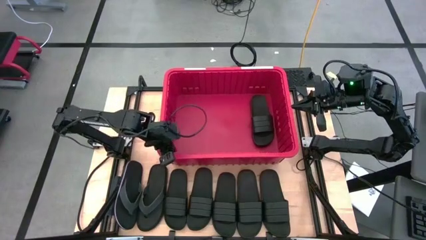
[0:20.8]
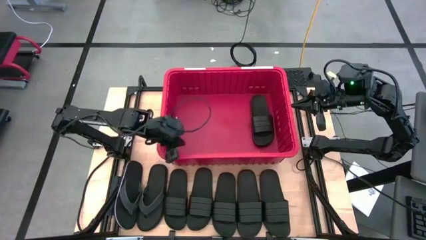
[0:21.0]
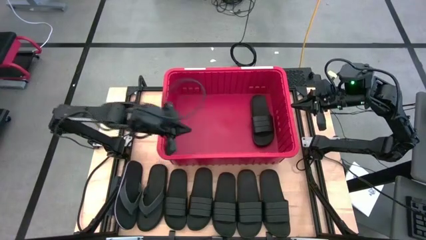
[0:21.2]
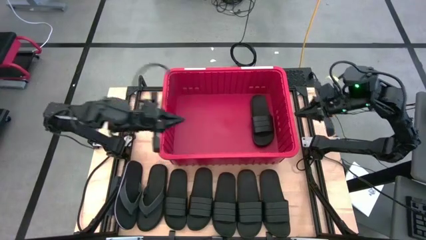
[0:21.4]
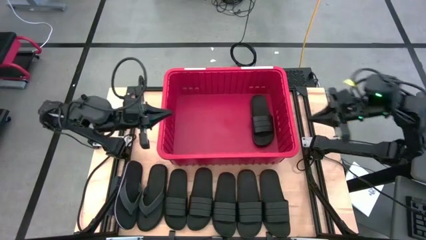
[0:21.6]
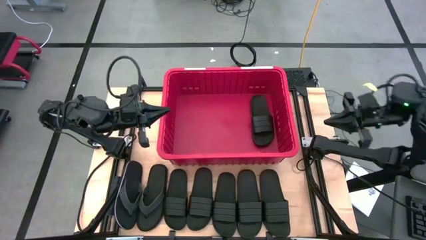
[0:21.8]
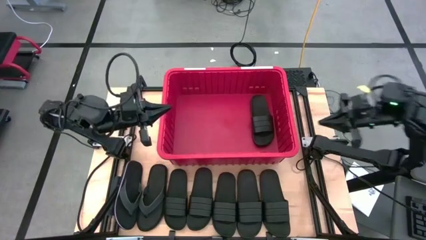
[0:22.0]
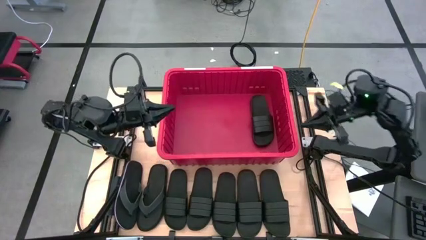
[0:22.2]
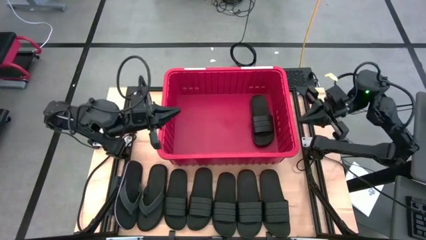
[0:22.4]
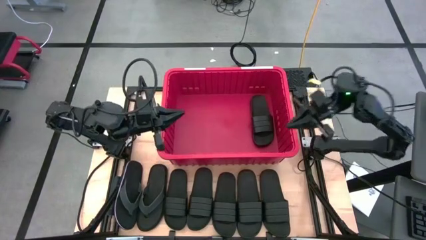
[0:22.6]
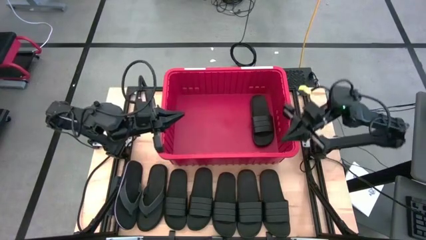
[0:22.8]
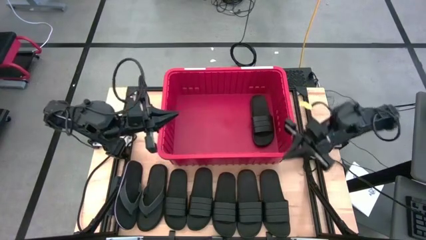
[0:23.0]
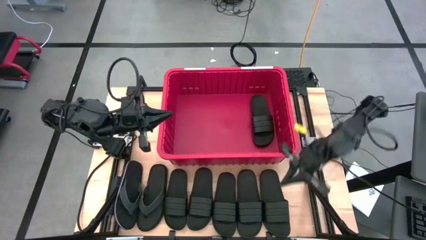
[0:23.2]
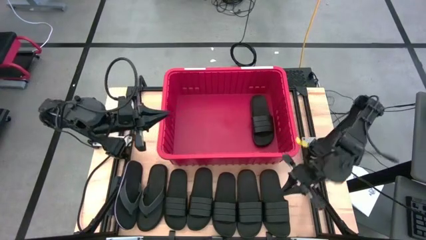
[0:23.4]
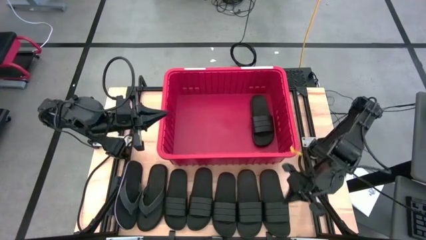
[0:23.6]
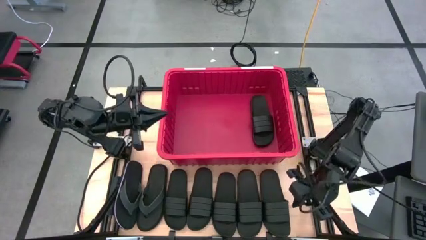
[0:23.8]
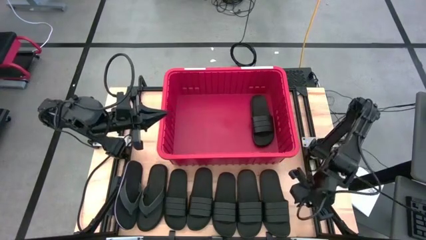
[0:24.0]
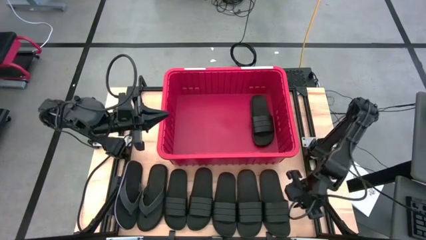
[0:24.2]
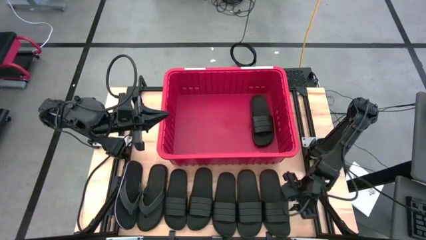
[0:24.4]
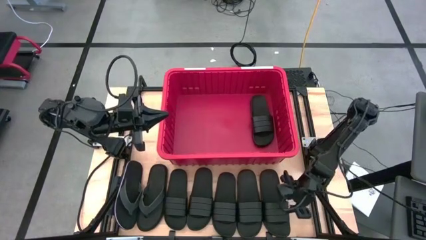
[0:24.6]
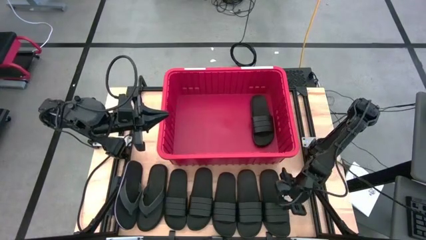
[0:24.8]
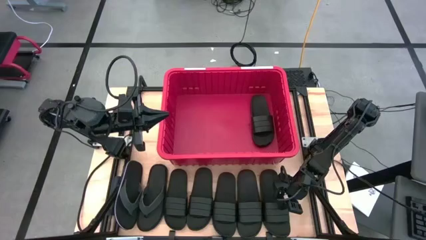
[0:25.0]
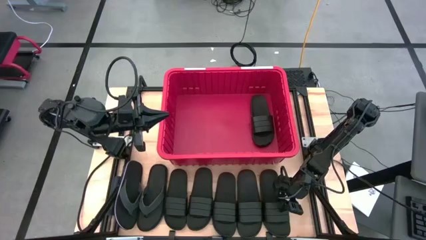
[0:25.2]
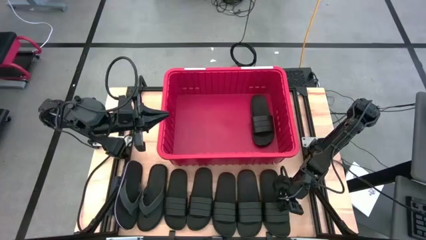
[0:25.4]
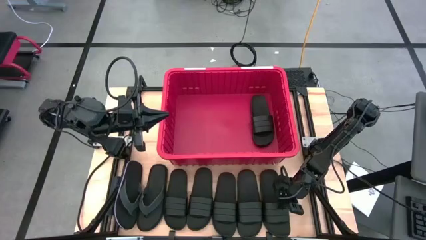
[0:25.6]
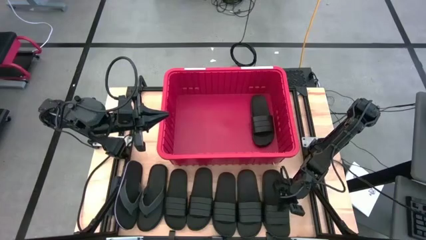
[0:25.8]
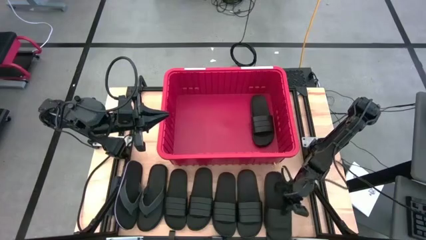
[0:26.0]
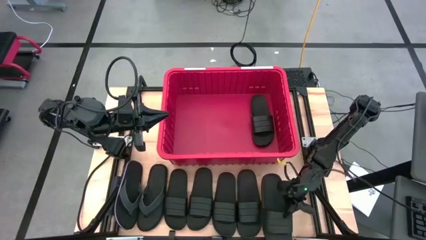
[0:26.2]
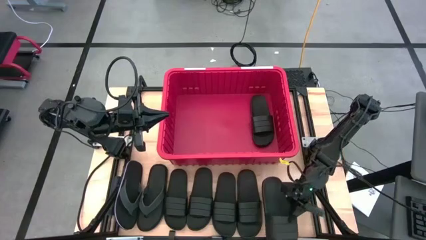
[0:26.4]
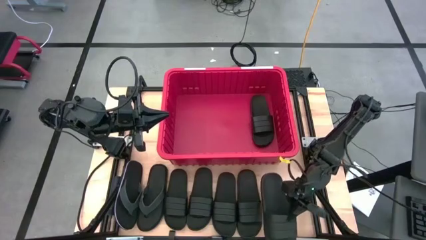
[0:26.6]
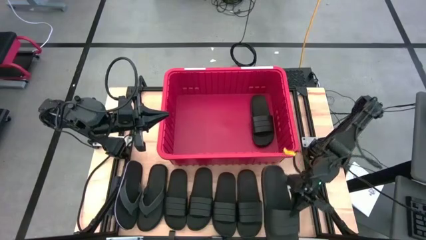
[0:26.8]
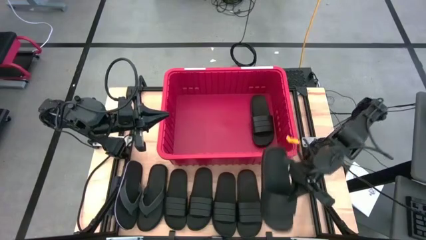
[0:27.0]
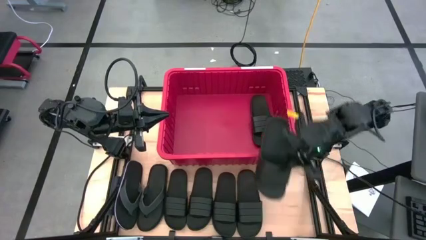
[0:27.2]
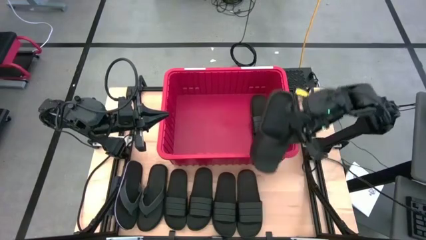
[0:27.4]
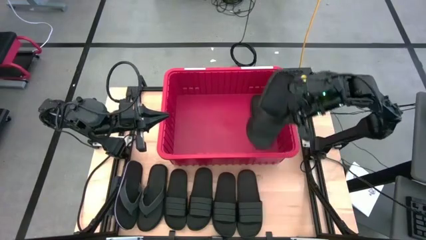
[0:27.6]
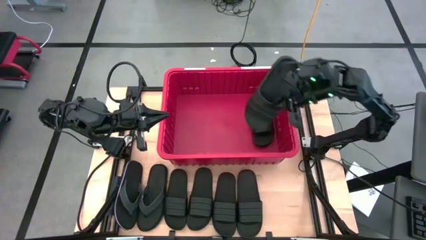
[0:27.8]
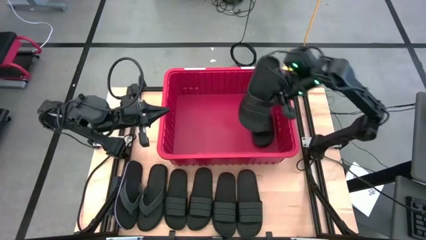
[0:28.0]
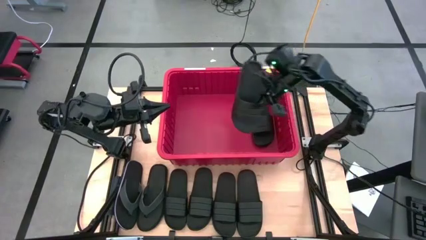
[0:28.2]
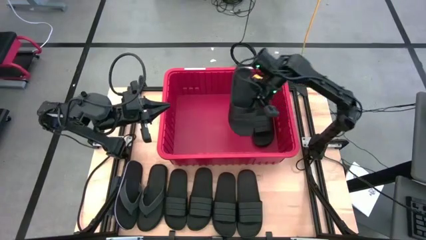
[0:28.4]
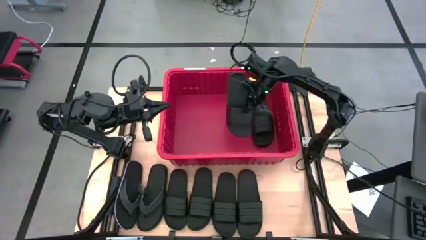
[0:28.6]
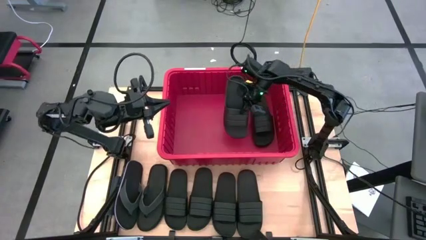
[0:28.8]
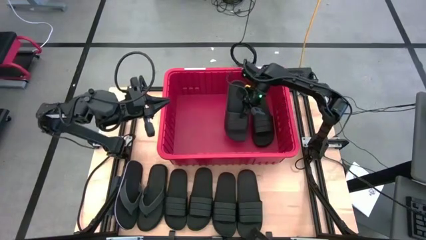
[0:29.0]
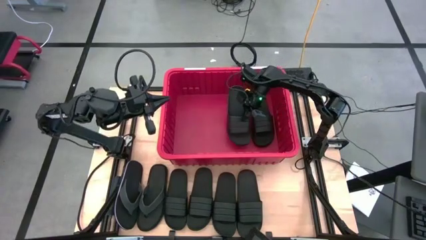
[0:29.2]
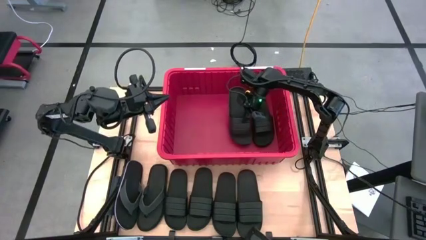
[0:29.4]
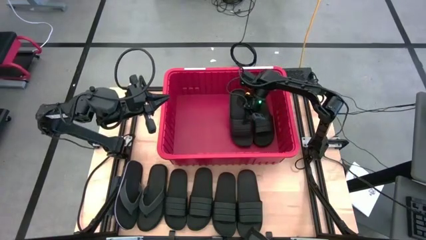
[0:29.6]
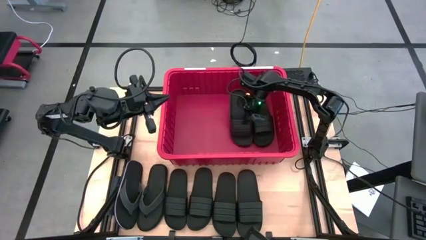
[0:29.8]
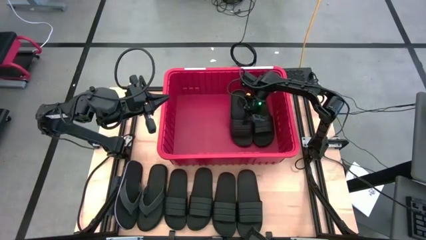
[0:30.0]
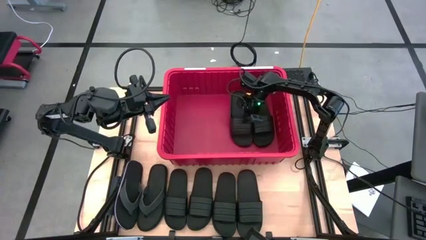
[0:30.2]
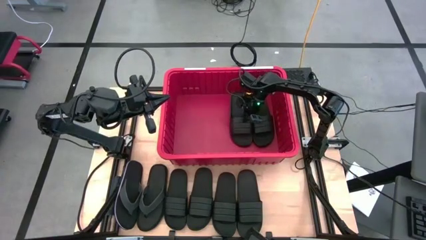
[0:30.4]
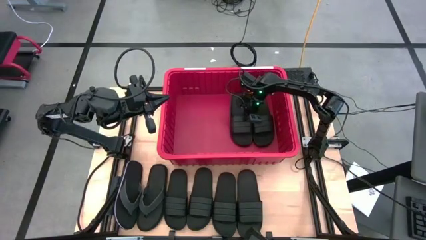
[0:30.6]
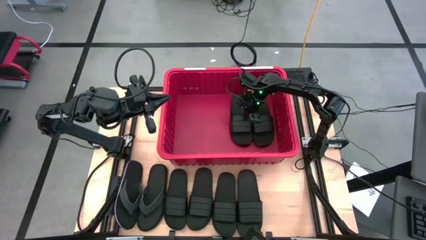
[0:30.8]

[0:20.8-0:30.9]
Task: Pick and place slides into bin
Put the black slide into the red bin

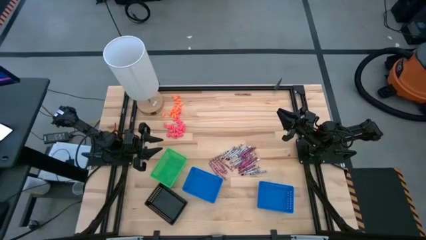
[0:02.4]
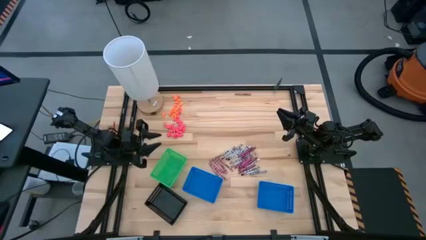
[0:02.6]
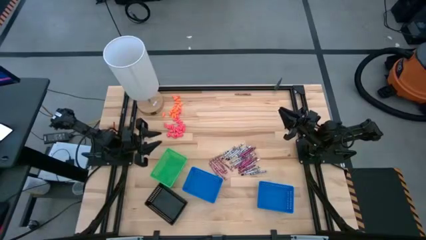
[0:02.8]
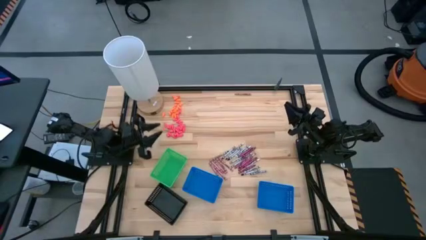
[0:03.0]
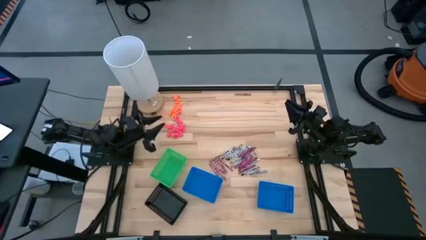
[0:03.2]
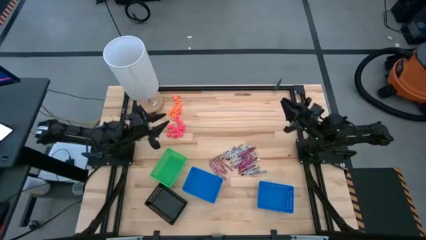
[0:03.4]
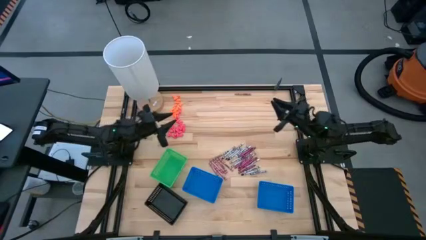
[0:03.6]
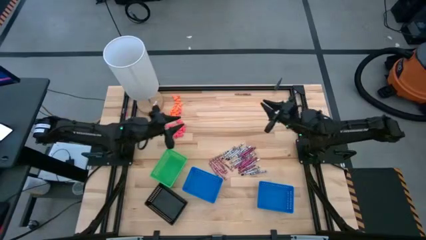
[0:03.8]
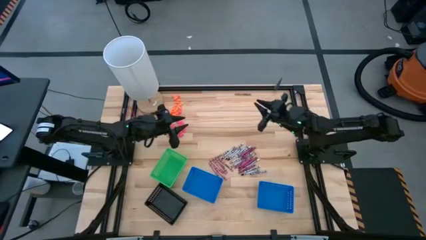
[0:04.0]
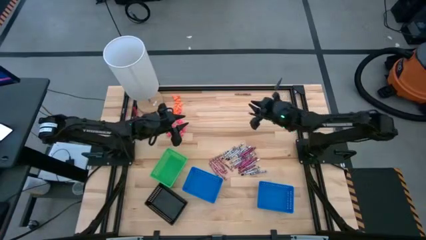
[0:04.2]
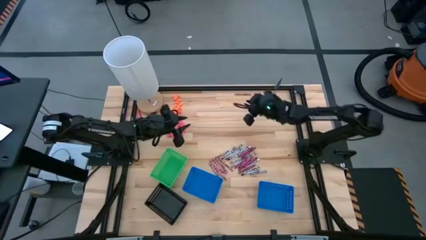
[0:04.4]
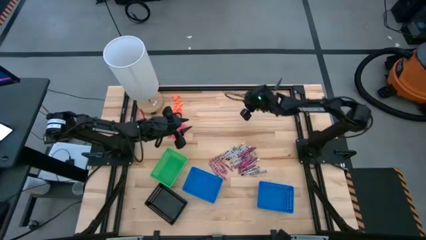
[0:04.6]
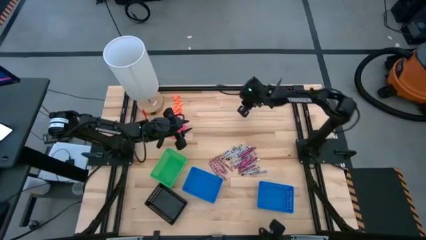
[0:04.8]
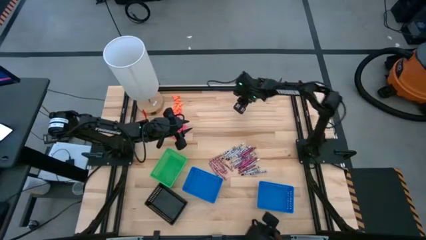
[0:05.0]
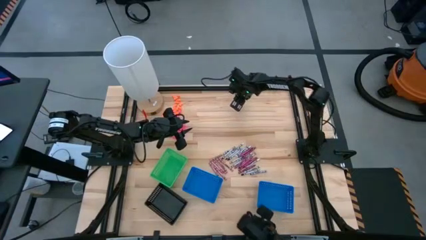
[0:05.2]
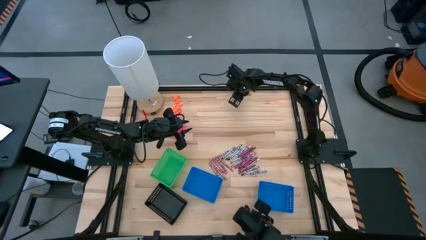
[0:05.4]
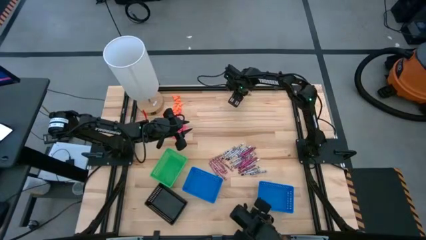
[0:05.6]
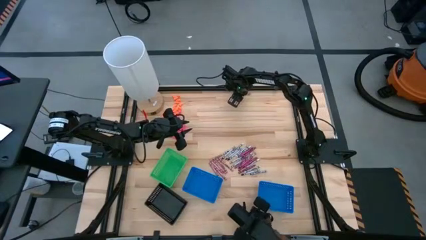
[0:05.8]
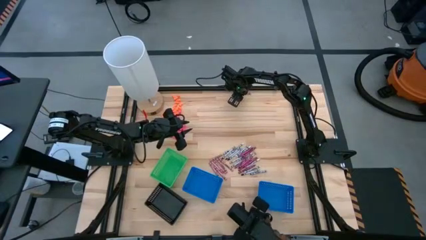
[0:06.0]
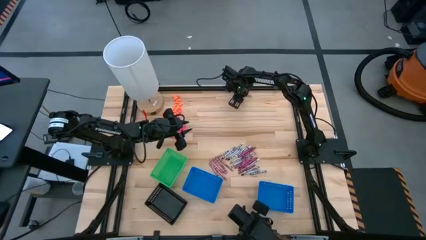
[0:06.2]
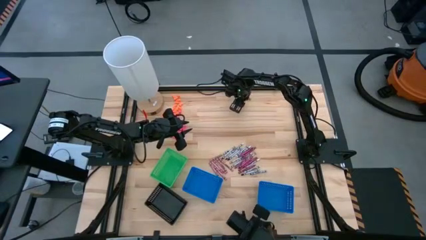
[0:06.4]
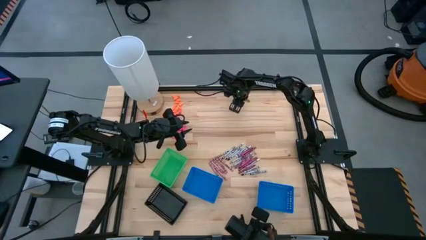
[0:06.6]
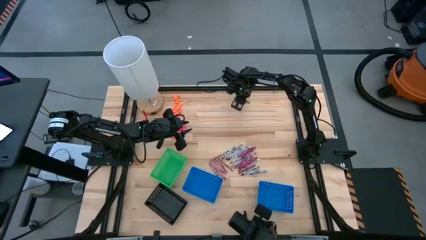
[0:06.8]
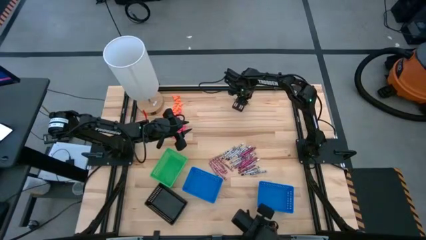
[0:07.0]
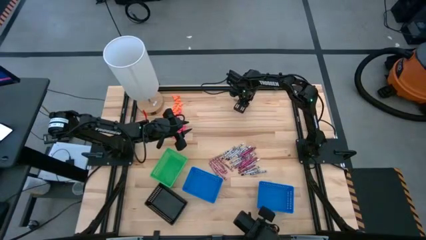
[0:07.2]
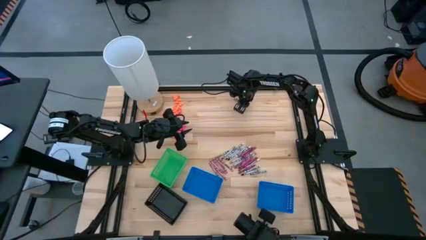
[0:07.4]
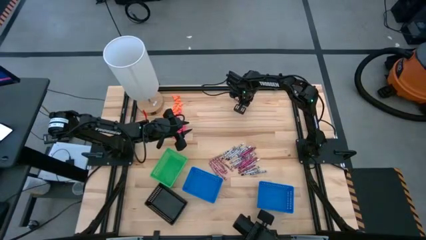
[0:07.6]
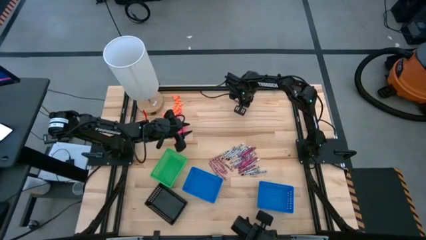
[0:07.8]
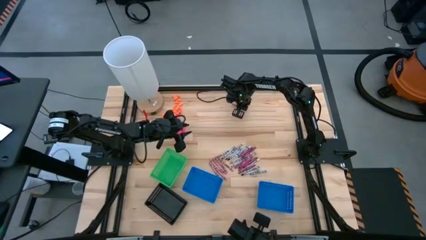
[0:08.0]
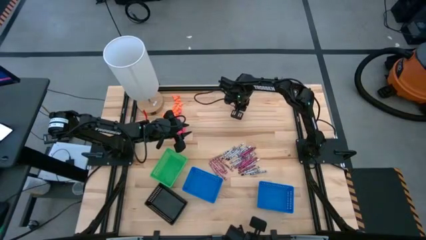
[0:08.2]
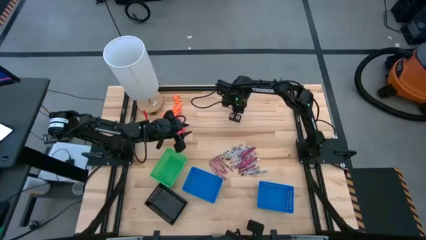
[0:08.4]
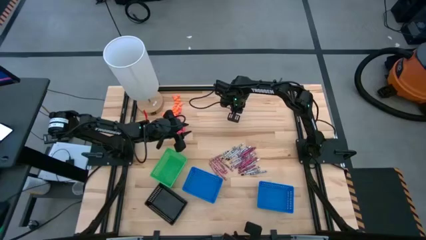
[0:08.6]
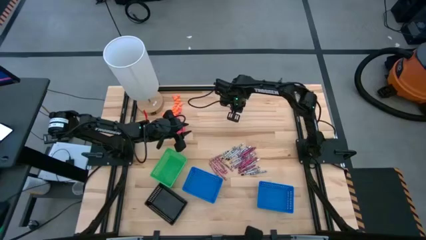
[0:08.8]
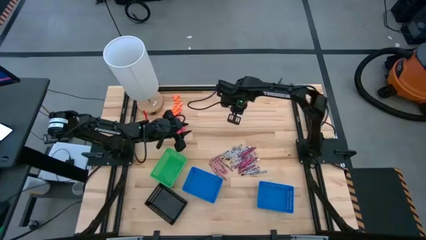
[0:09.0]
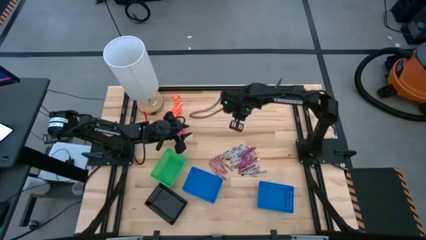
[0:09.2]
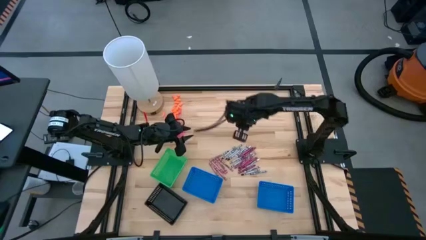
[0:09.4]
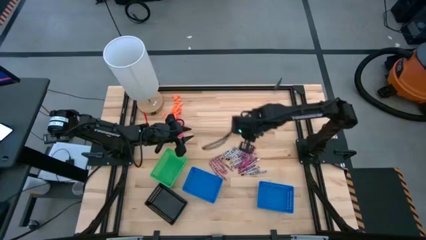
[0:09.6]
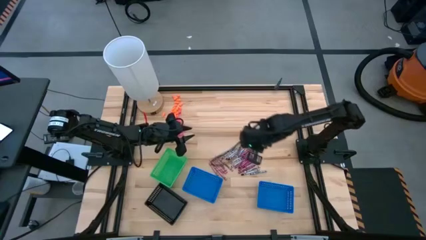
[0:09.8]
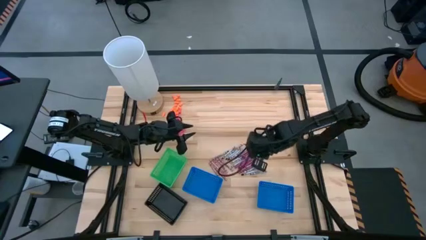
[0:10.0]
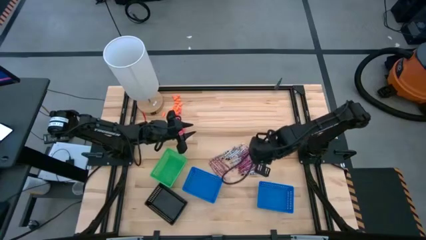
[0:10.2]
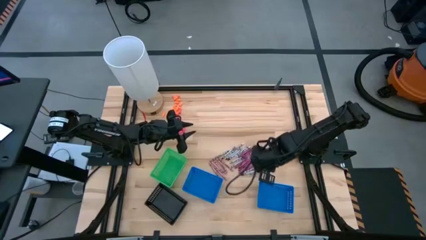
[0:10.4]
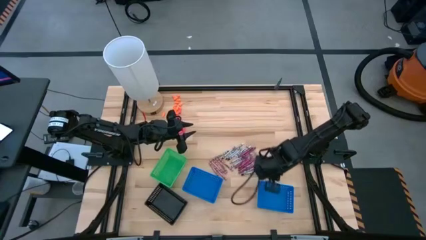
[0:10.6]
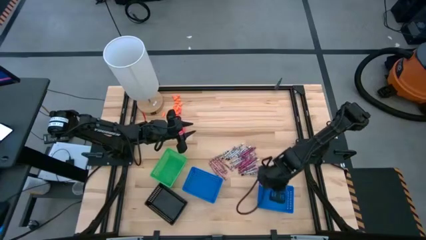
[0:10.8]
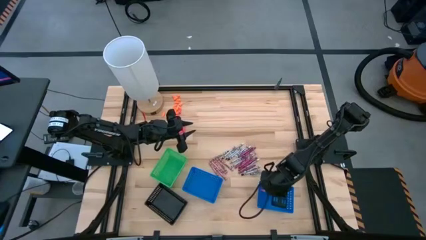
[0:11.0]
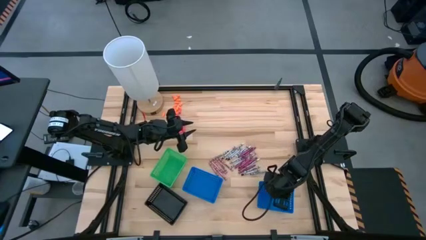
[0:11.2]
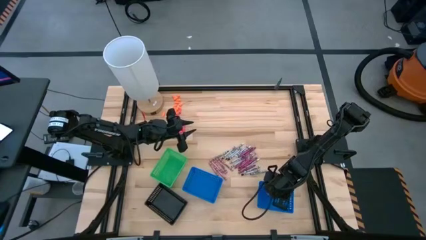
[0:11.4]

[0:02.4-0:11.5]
Task: Sort crayons
Put the pink crayon into the right blue basket
